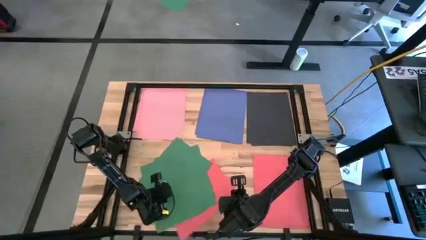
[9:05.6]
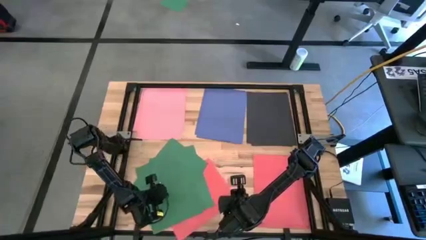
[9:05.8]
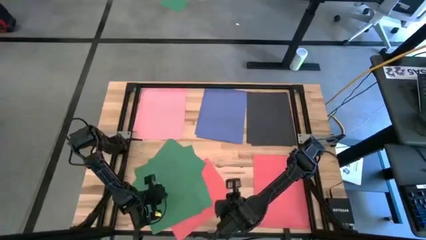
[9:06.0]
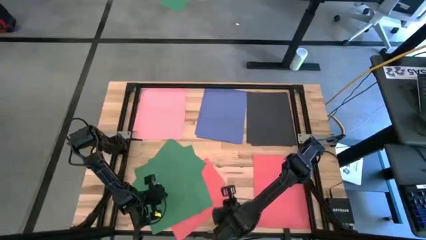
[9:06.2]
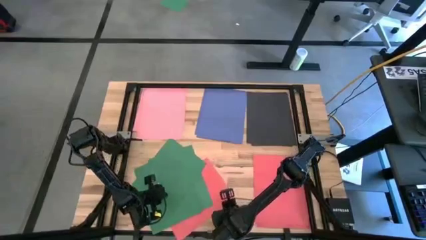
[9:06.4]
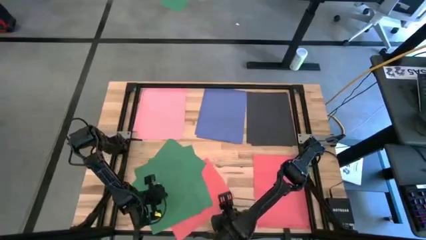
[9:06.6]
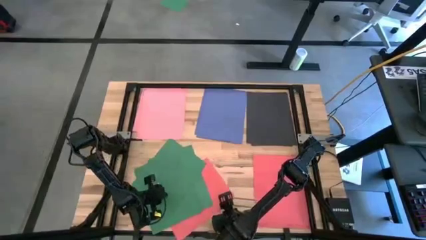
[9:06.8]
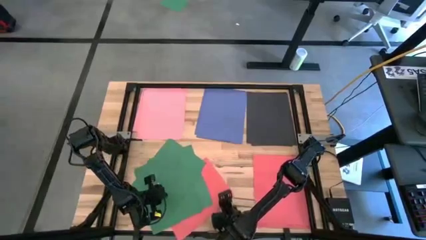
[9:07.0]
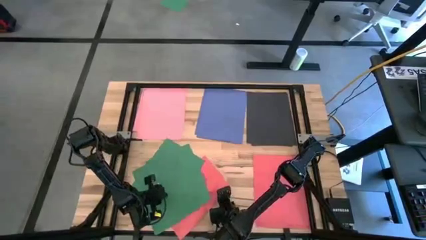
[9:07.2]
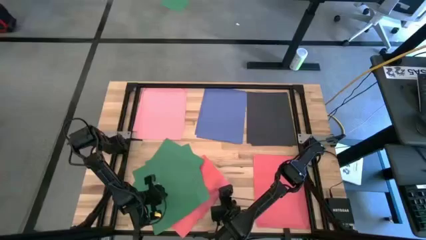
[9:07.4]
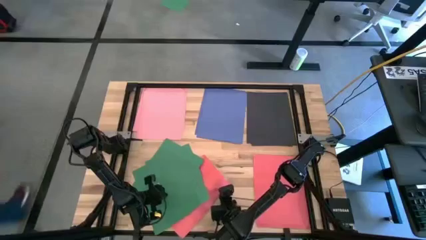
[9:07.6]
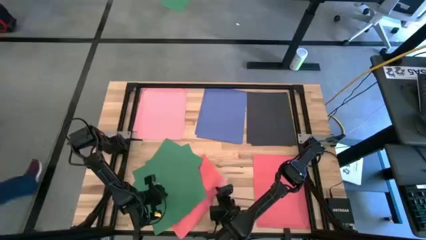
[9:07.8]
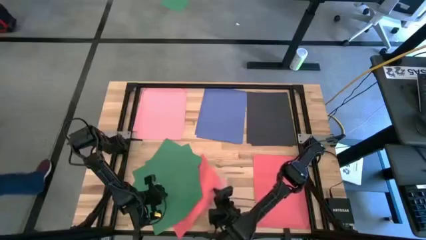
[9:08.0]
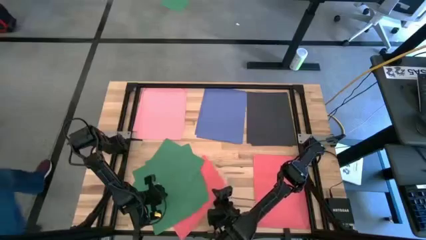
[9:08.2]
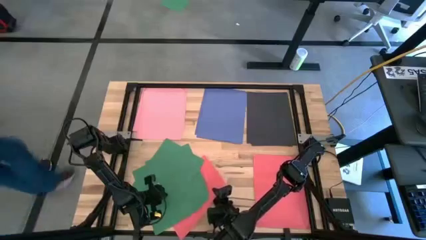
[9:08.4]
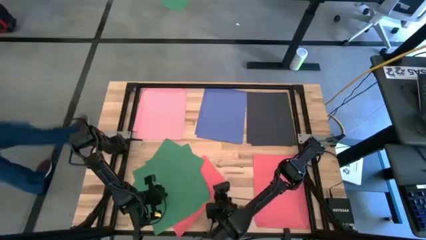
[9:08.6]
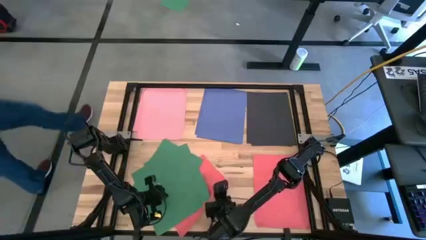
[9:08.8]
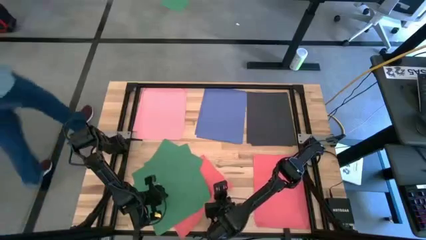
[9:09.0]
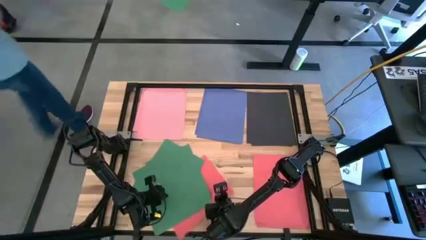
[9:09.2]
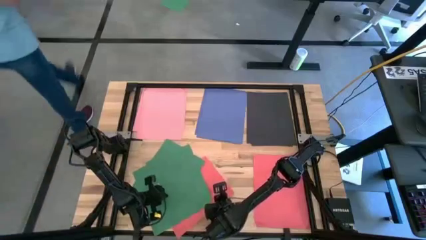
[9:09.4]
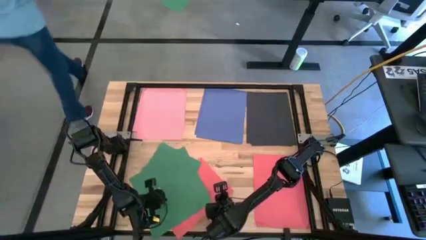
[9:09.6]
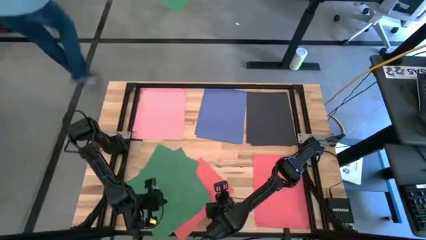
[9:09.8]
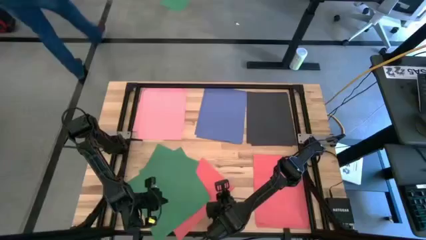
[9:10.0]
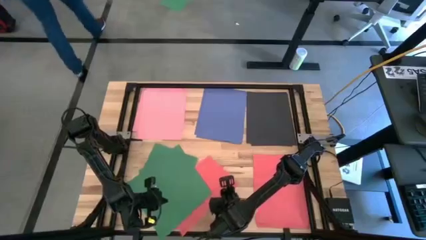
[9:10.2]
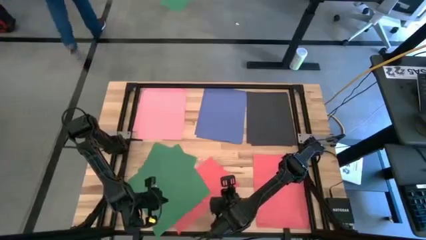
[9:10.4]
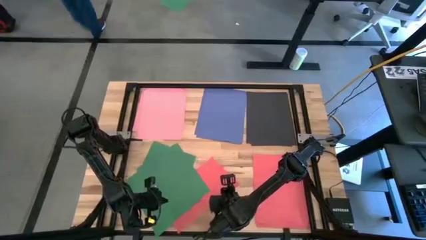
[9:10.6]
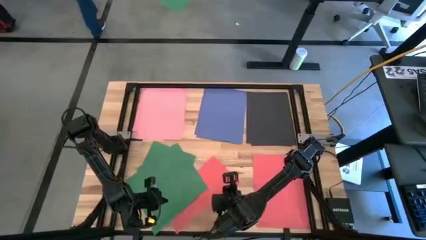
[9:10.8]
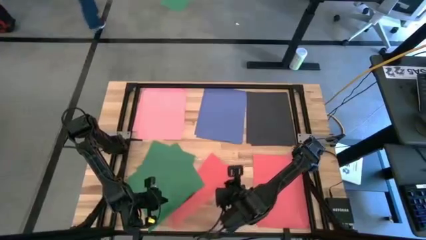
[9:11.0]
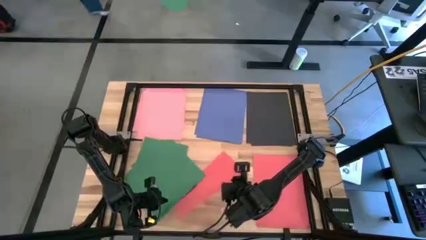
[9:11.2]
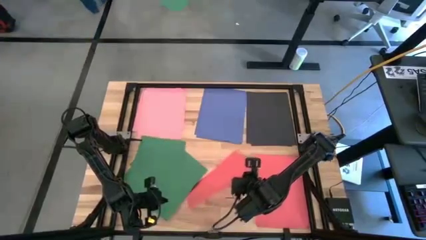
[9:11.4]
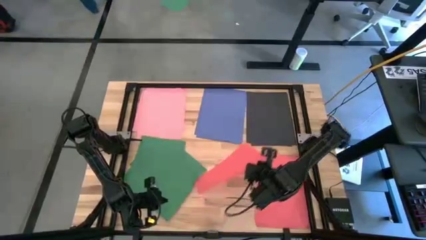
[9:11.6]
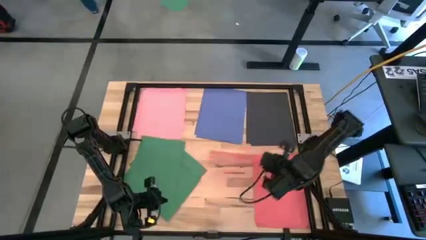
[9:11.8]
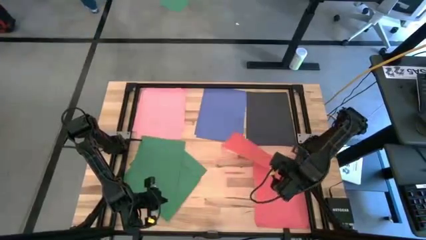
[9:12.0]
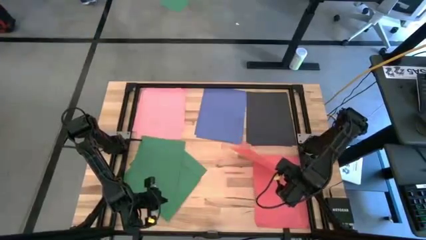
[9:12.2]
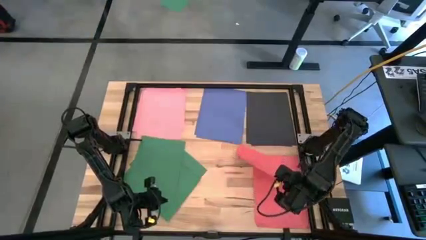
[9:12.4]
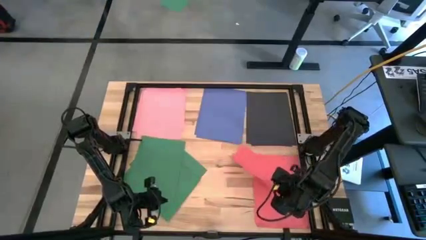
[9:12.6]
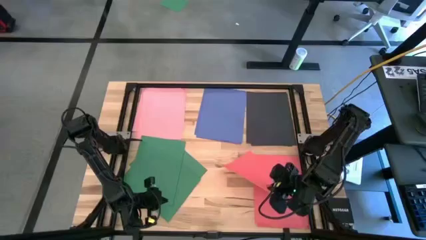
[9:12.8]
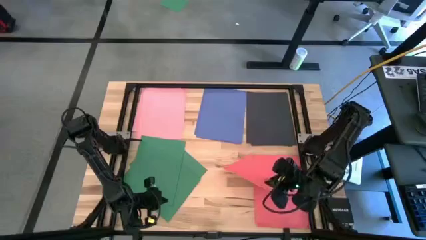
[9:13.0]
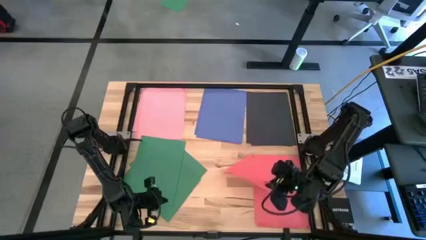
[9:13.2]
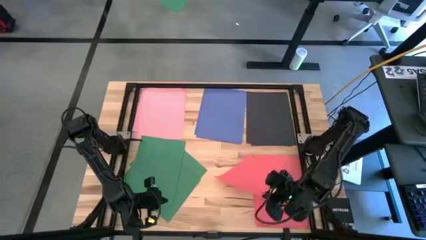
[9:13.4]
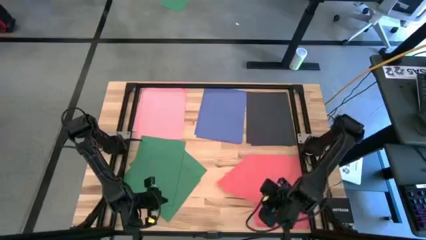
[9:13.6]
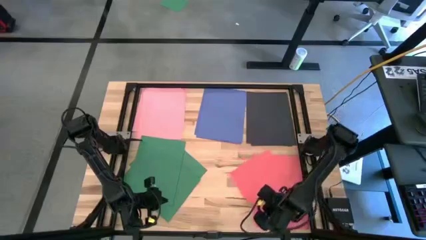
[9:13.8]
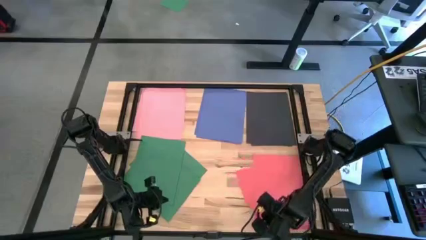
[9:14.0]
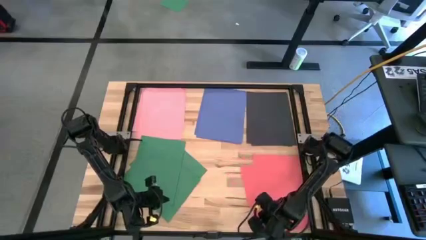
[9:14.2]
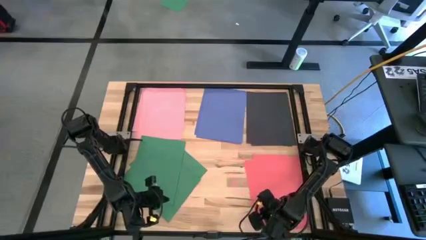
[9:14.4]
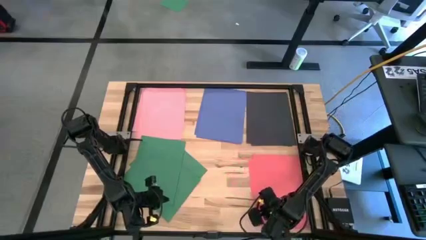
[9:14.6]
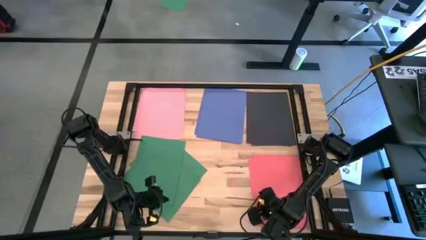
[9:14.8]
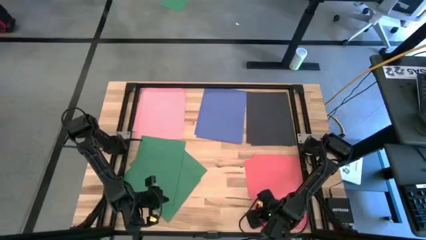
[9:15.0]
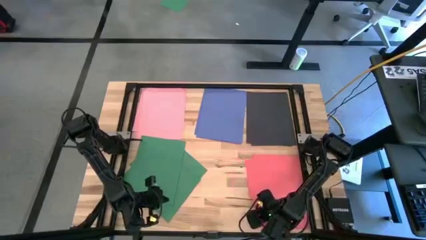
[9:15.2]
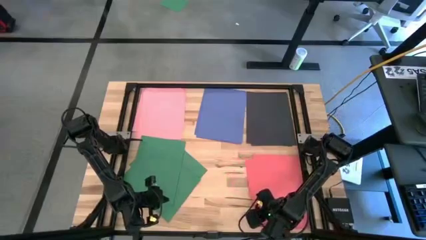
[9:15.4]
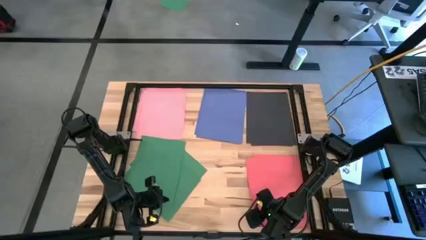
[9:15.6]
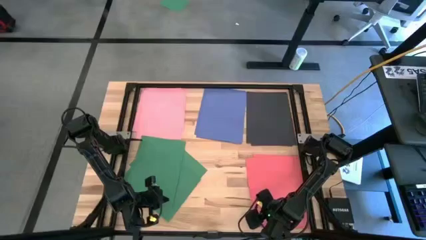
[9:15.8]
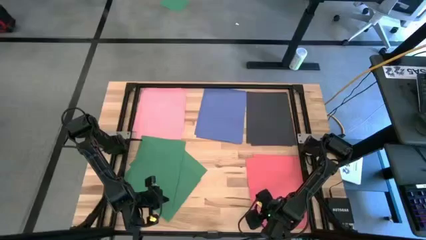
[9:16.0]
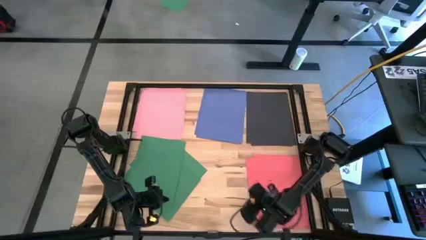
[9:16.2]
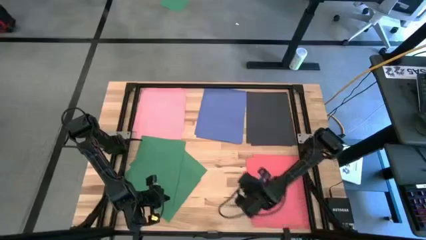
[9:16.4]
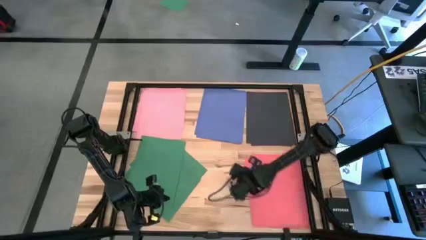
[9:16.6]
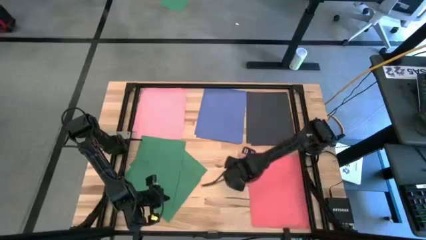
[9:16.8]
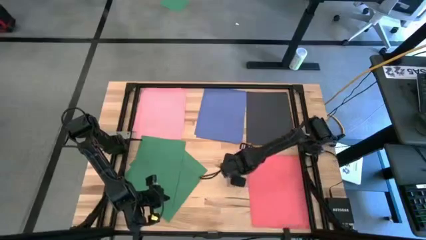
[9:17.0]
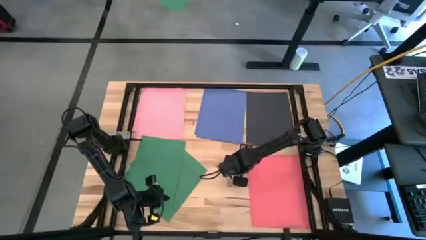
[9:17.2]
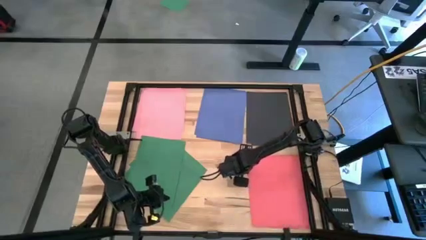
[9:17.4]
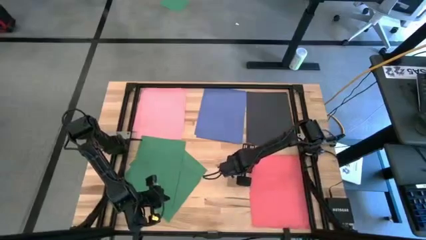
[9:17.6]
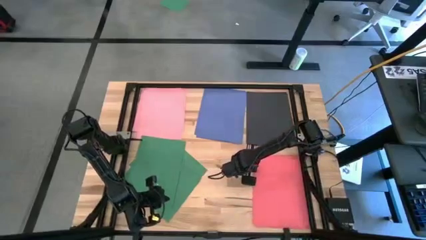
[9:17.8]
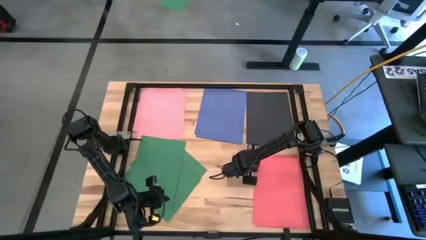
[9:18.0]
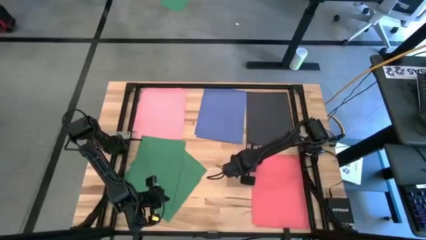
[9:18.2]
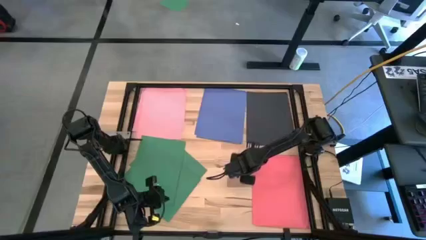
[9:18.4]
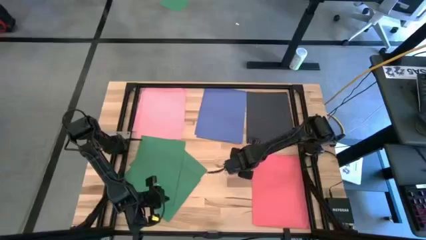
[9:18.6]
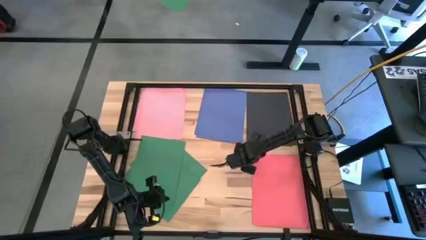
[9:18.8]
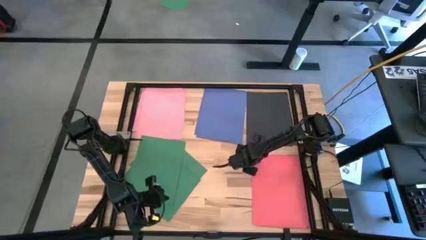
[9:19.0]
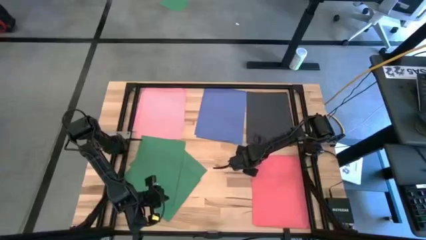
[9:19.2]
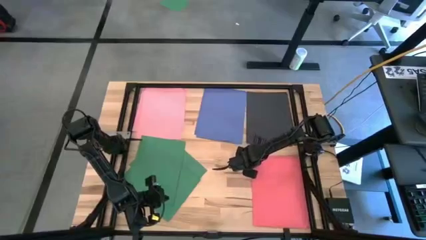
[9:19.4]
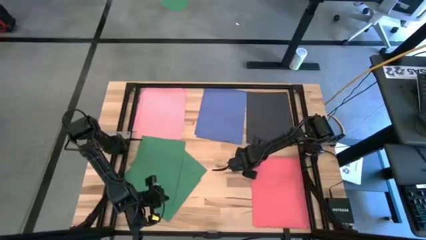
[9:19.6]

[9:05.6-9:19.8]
Task: Organize paper
Stack the red paper on top of the other red papers on the table
